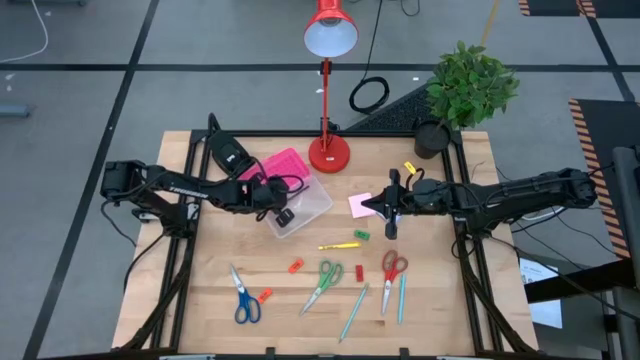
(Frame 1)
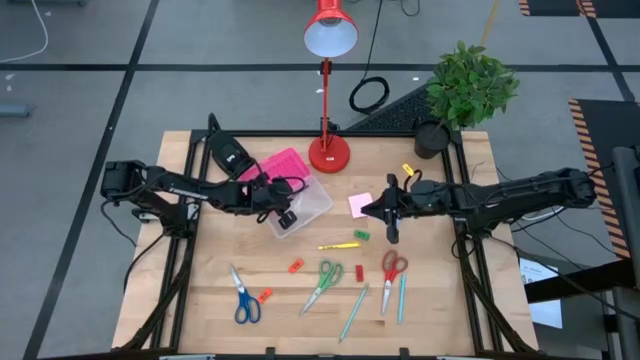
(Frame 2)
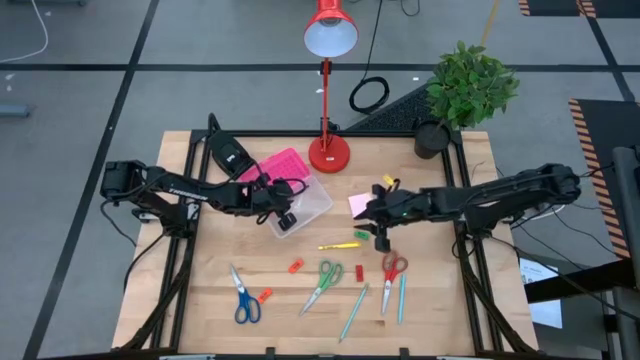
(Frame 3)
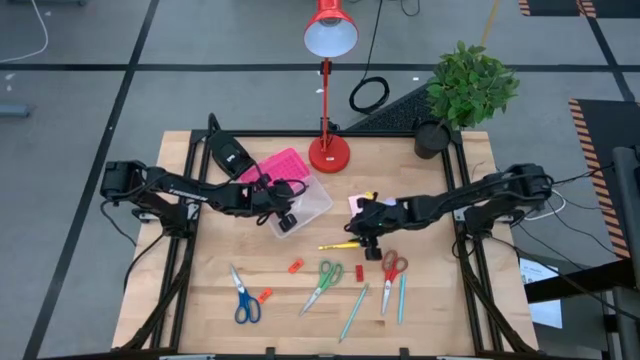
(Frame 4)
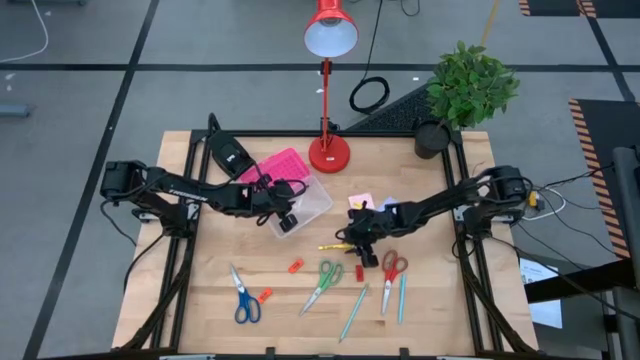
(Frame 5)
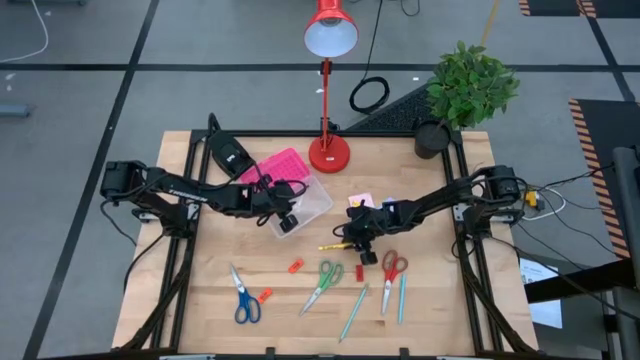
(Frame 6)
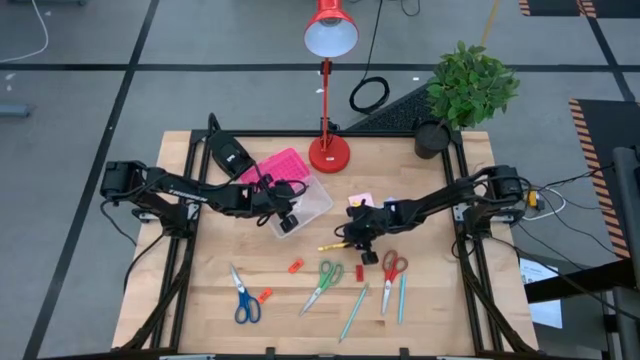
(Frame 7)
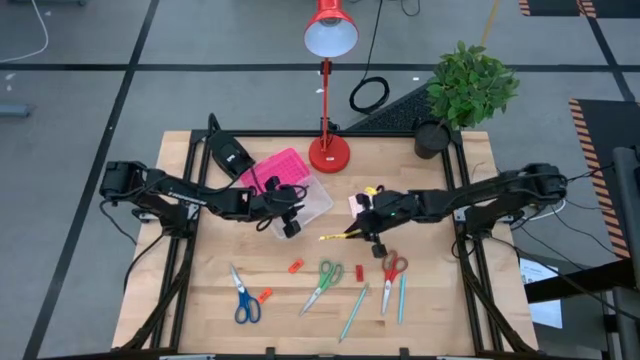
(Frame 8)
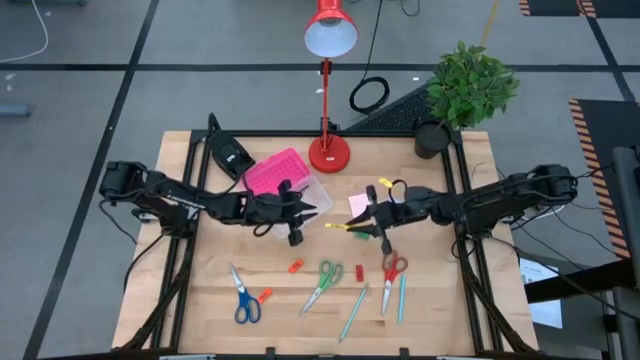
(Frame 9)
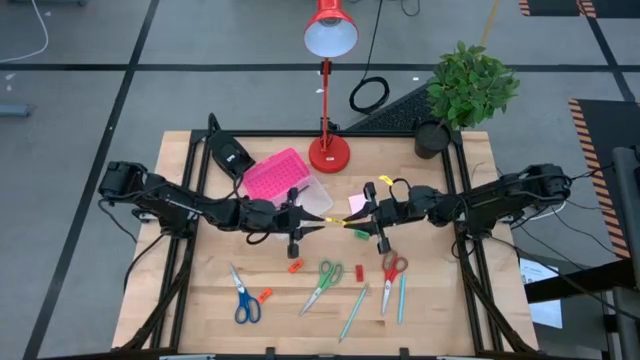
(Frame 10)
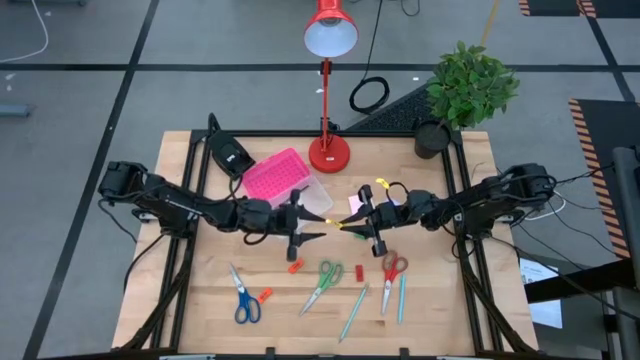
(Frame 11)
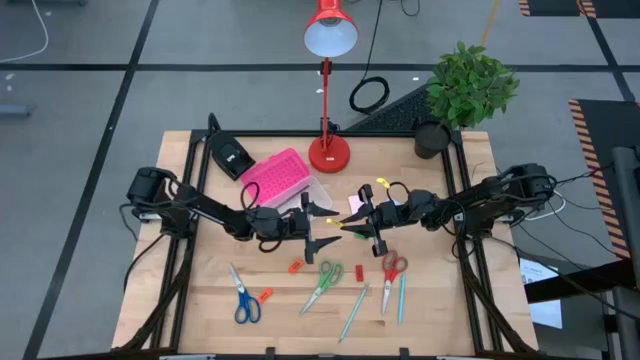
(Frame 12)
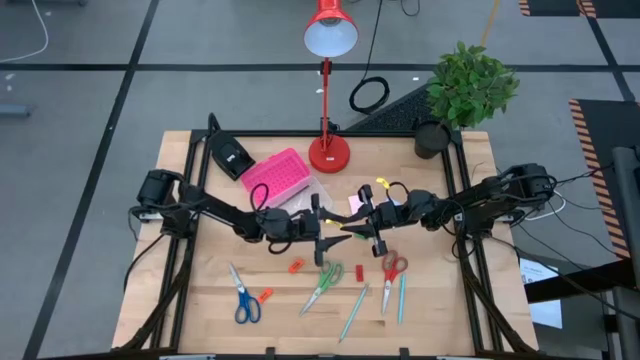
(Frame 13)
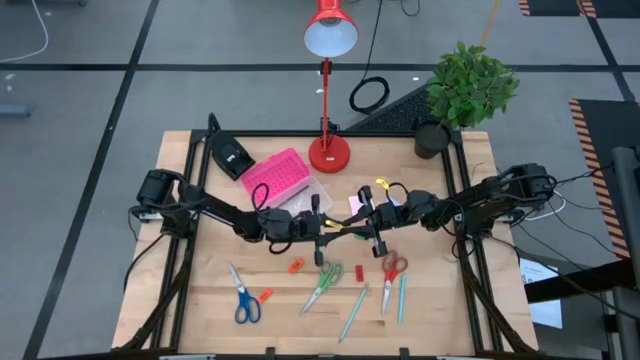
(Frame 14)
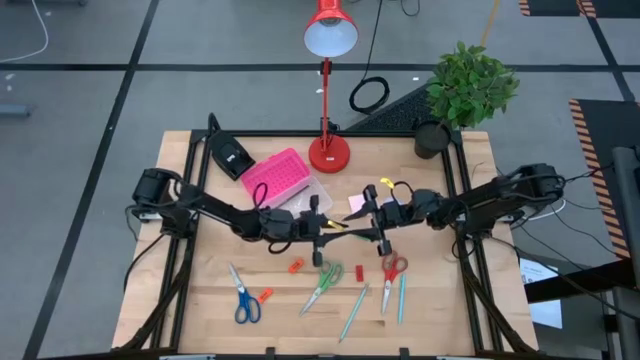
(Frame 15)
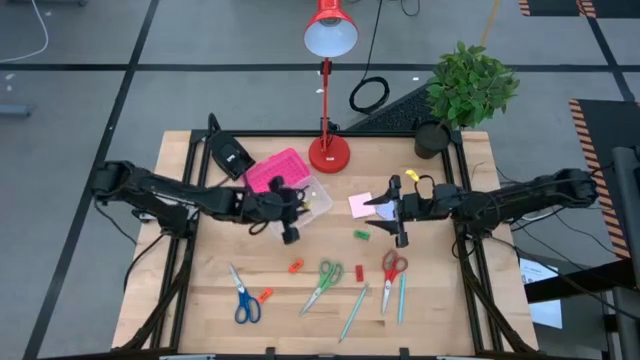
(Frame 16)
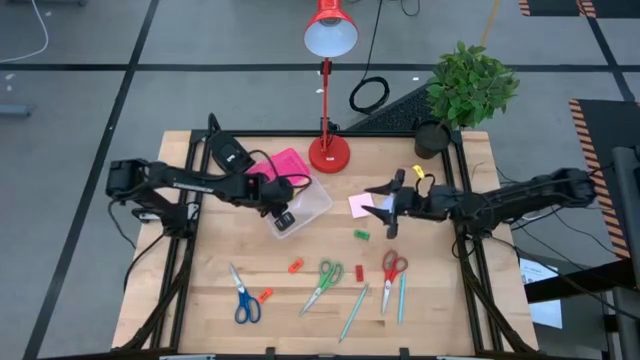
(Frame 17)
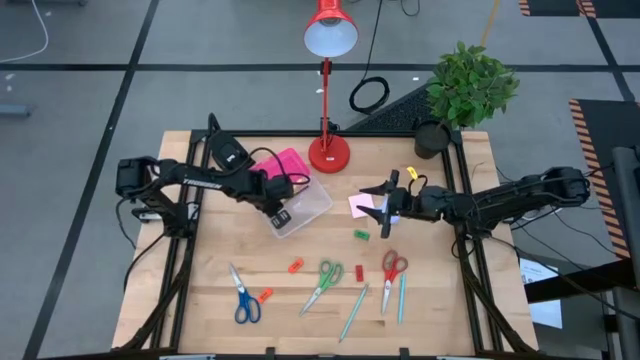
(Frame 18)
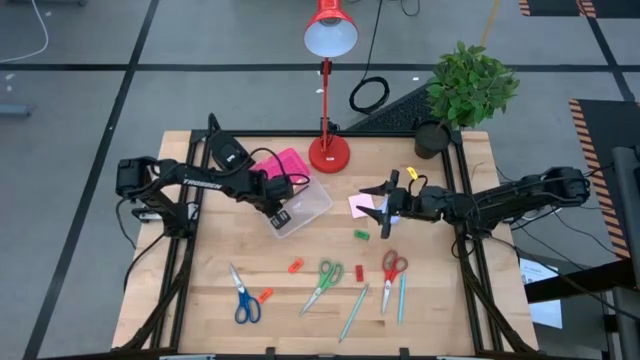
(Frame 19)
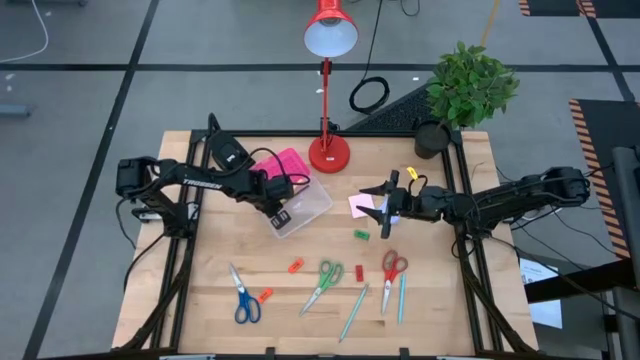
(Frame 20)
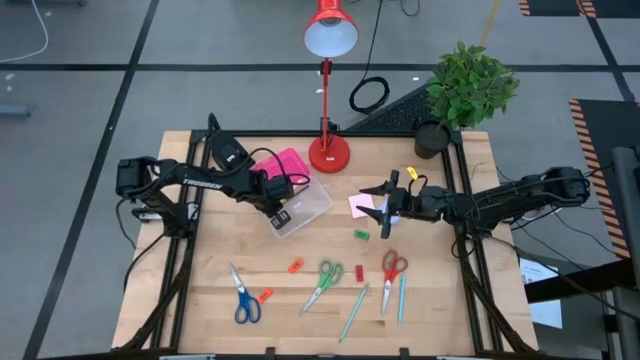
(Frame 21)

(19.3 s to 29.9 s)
Task: Pack school essentials
Put the yellow pen into the pink supply box

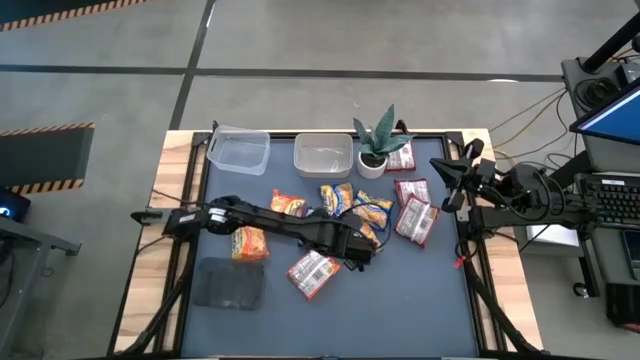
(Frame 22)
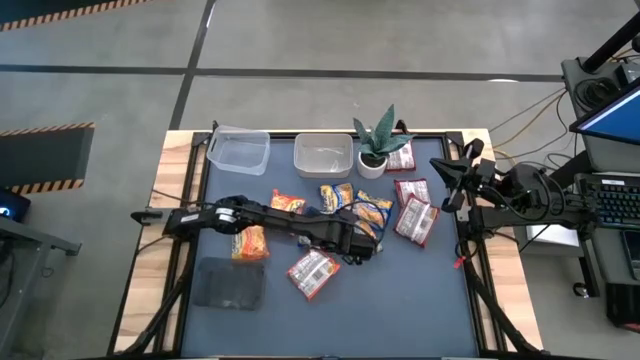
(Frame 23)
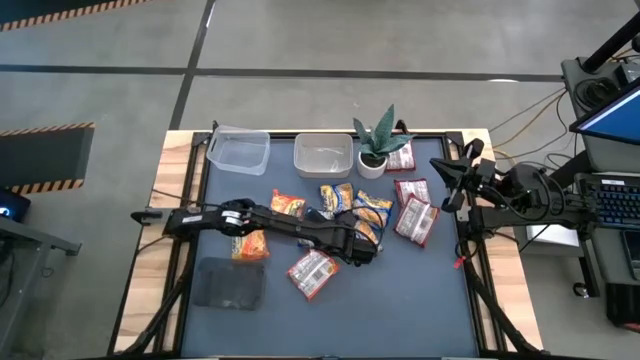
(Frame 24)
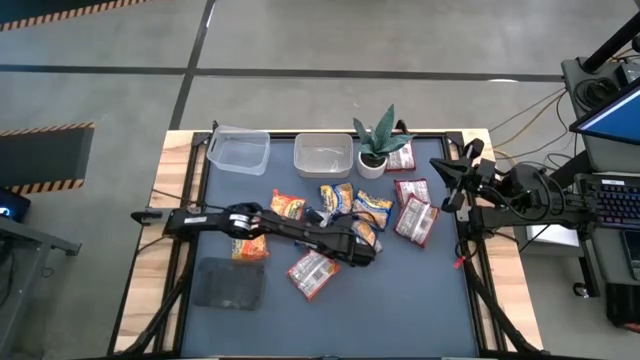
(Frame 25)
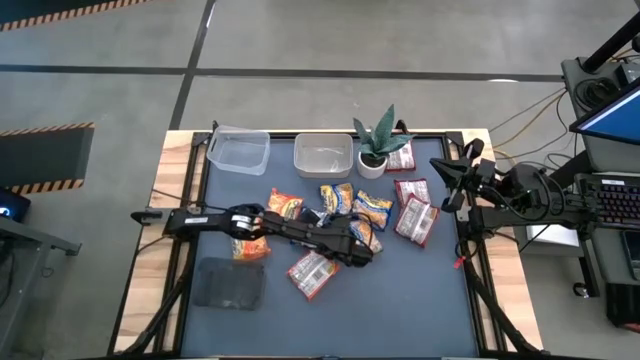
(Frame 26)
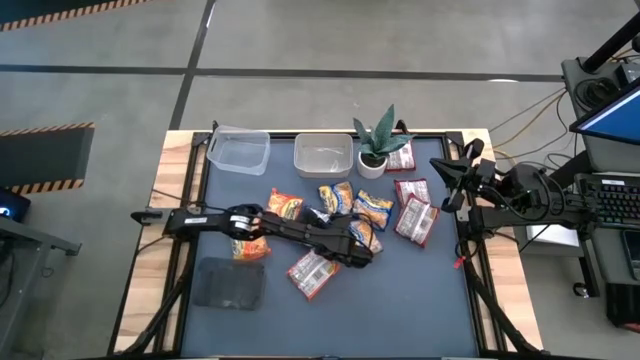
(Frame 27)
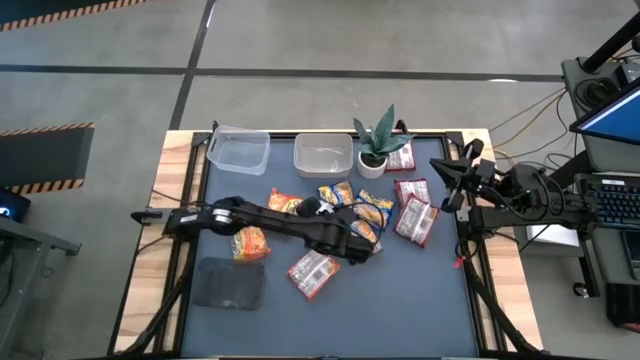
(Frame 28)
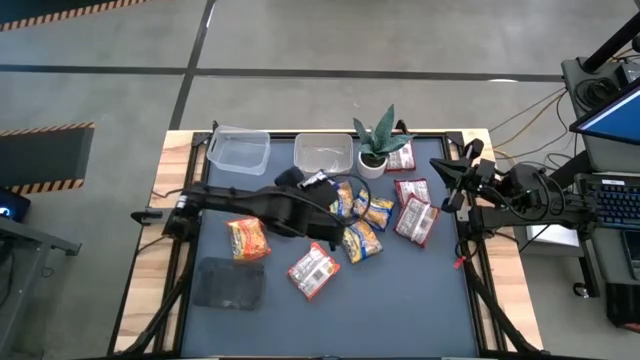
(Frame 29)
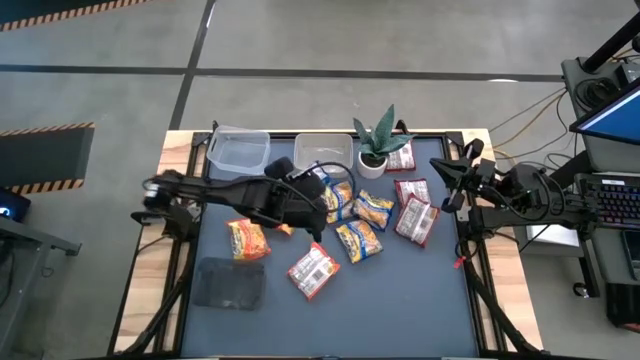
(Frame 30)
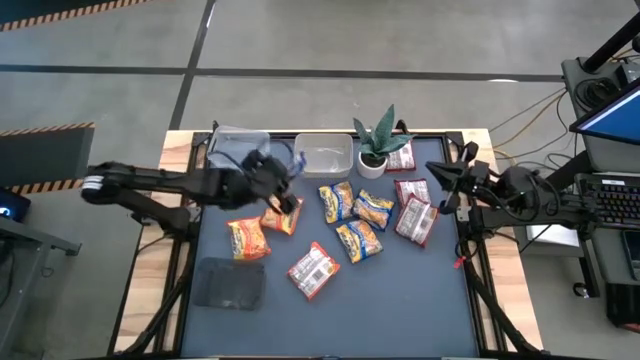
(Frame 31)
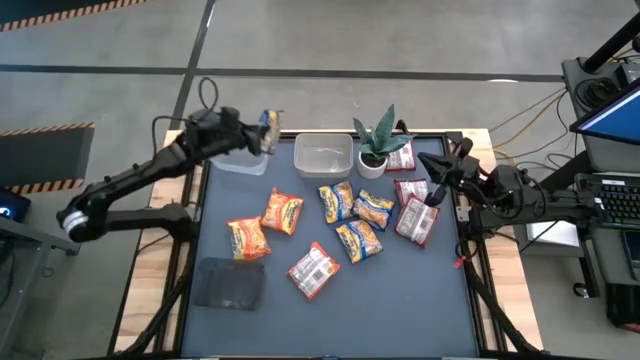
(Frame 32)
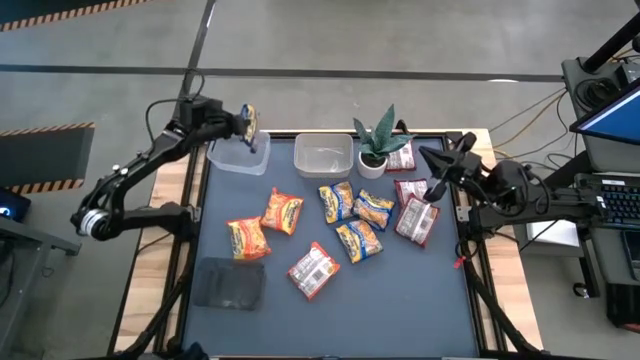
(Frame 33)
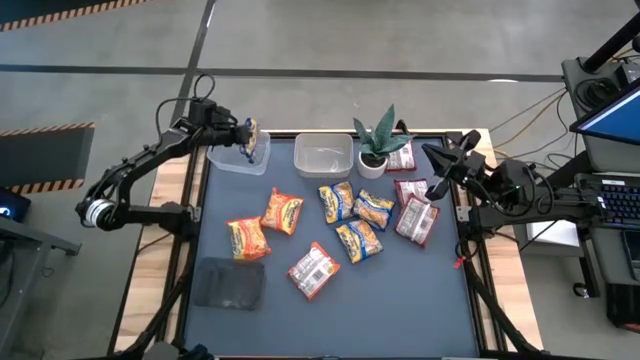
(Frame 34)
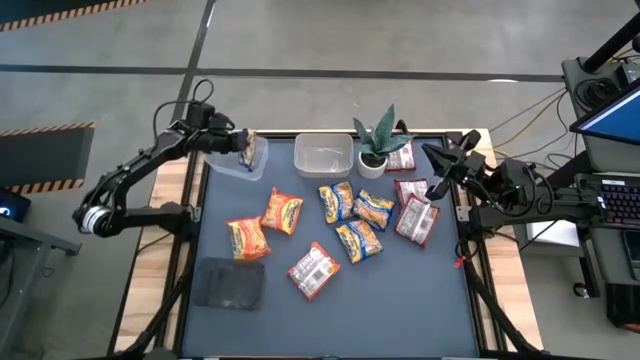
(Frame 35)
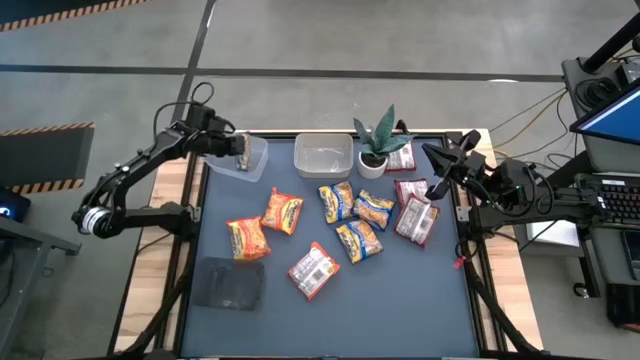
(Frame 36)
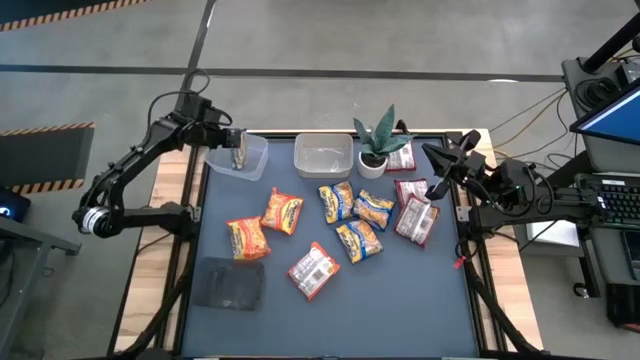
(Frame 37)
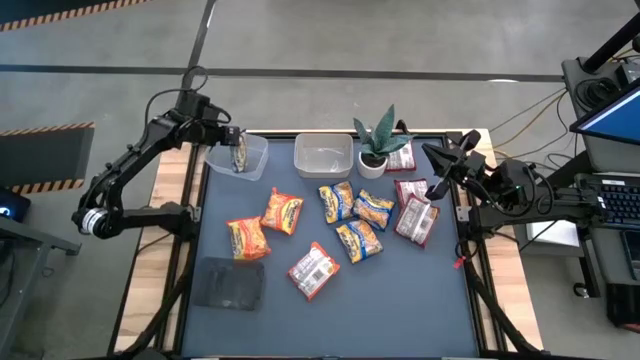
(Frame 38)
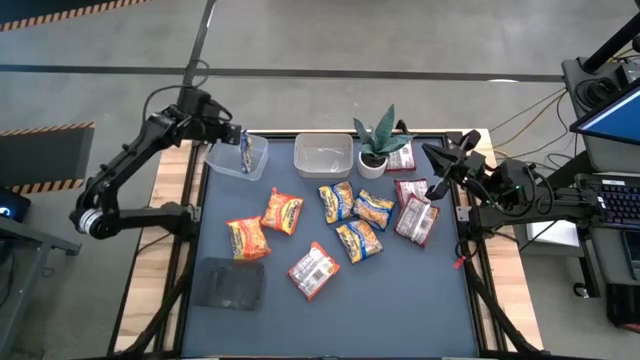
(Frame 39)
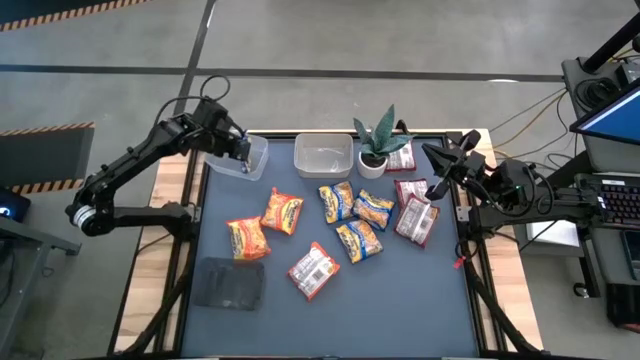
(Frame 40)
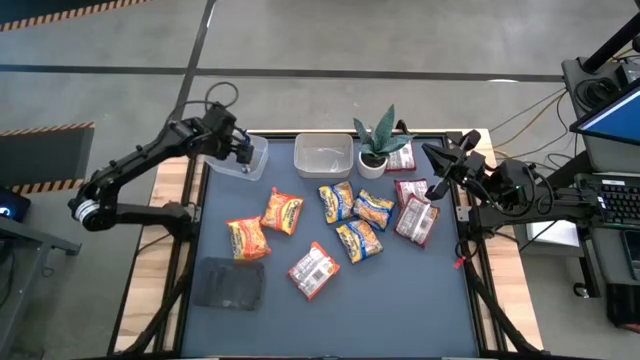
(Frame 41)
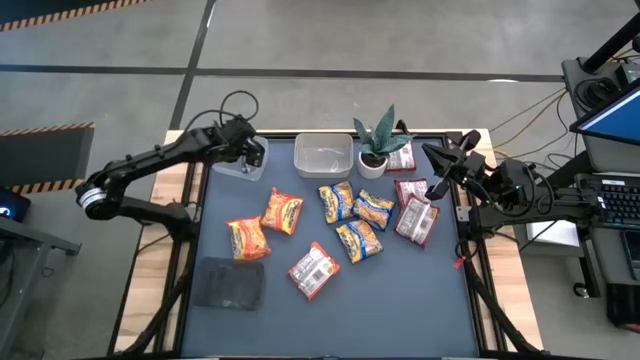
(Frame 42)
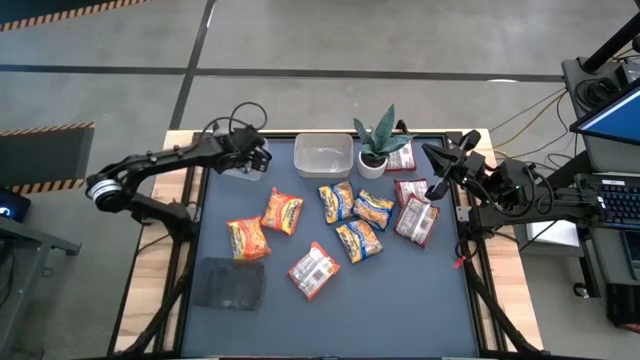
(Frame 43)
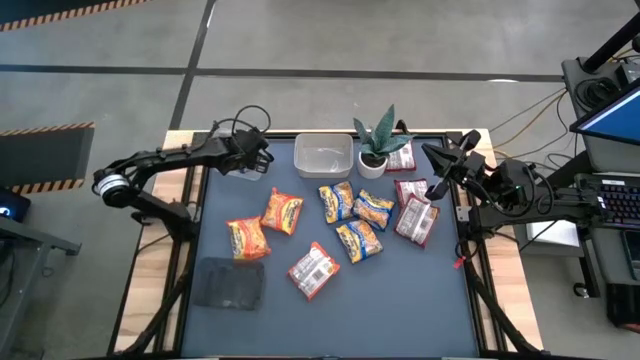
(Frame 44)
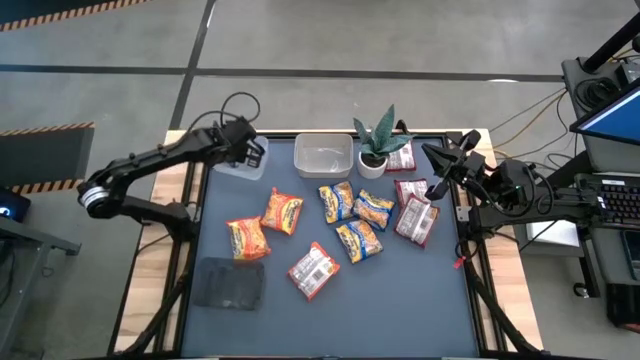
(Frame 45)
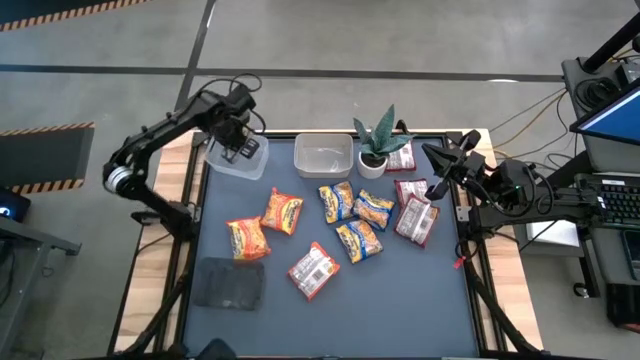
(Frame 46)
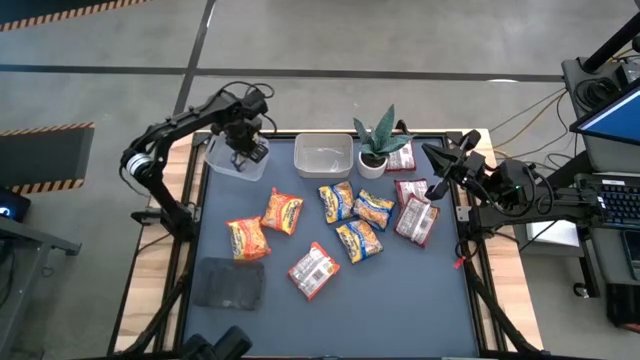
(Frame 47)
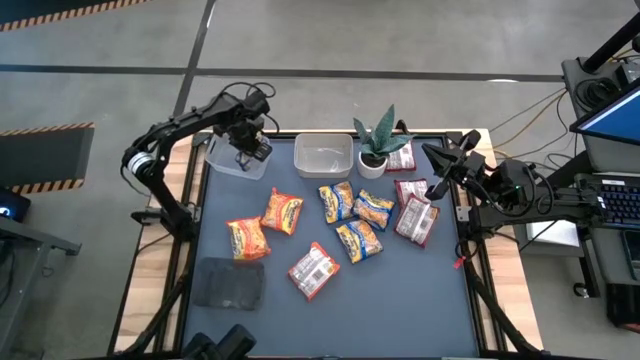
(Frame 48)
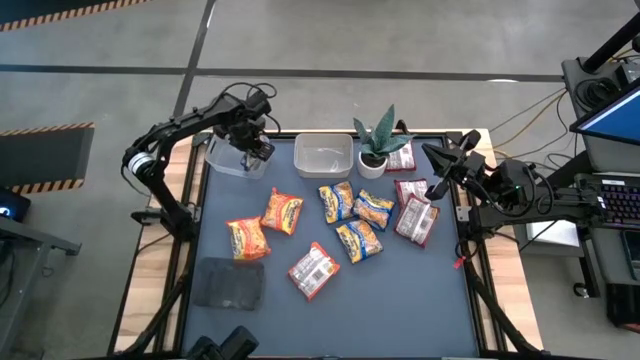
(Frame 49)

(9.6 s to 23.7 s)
Task: Sort Maruchan noodles
Put the blue noodle pack into the transparent bin
